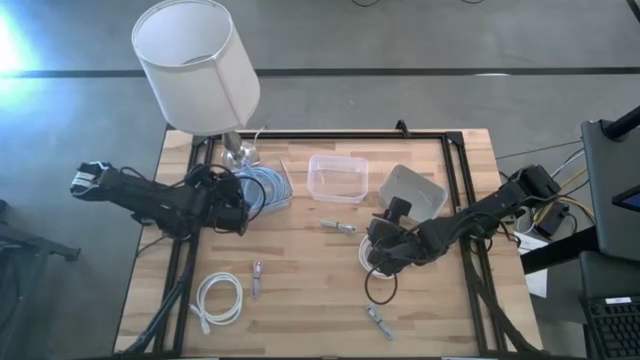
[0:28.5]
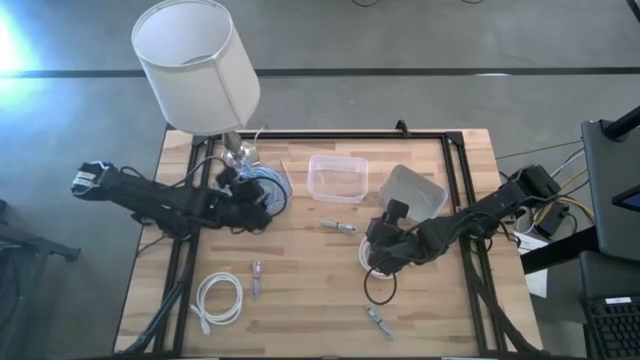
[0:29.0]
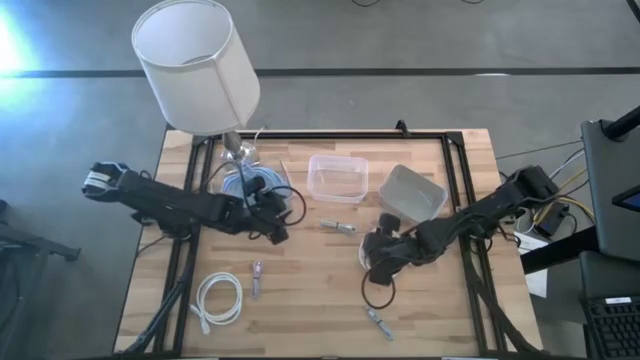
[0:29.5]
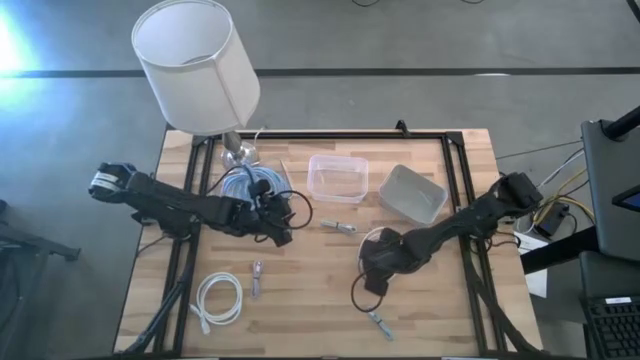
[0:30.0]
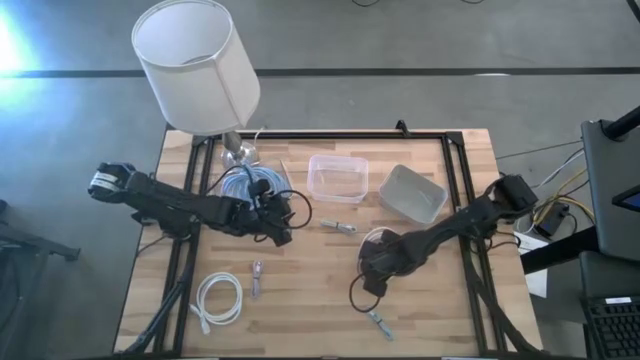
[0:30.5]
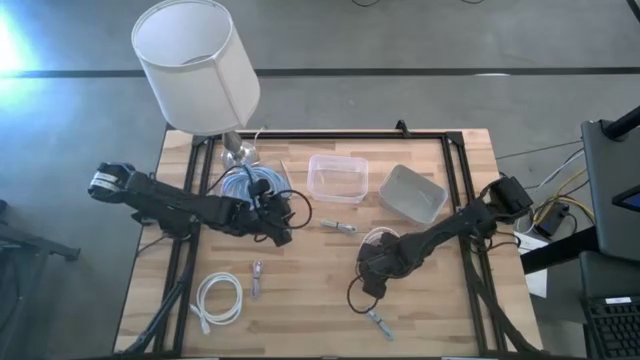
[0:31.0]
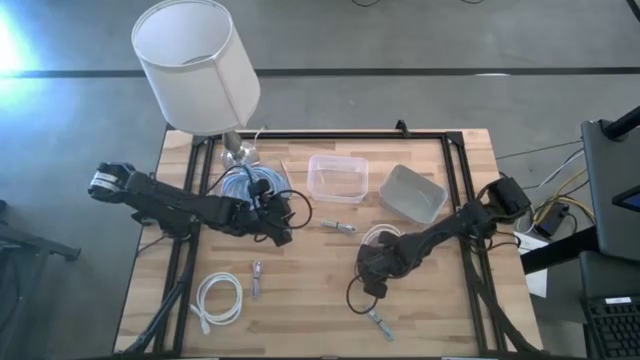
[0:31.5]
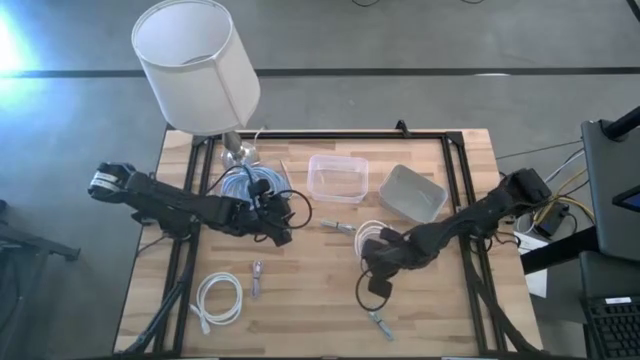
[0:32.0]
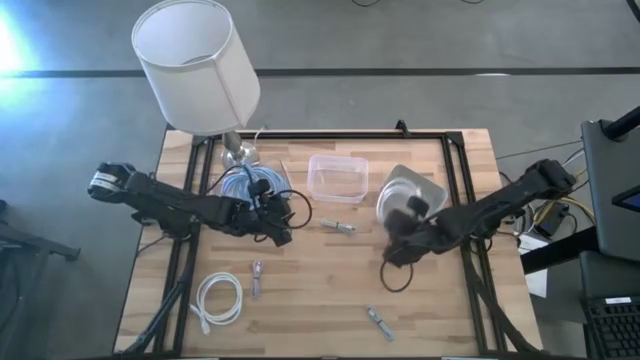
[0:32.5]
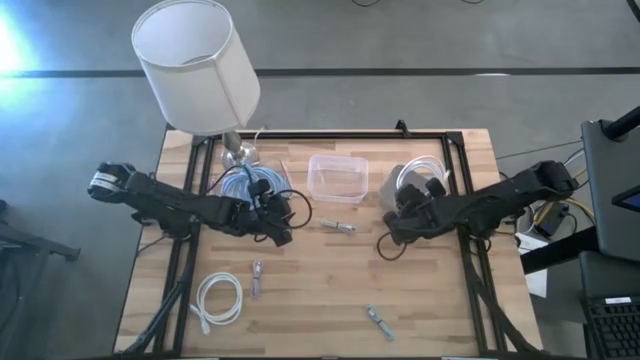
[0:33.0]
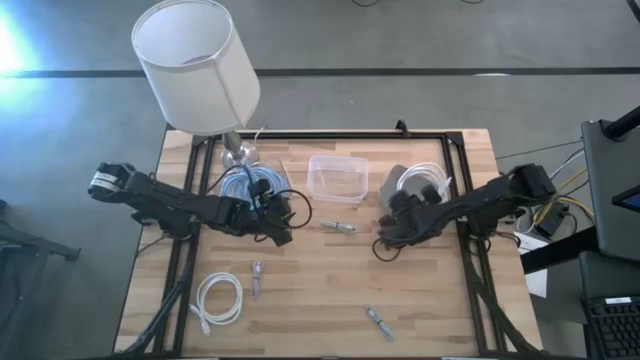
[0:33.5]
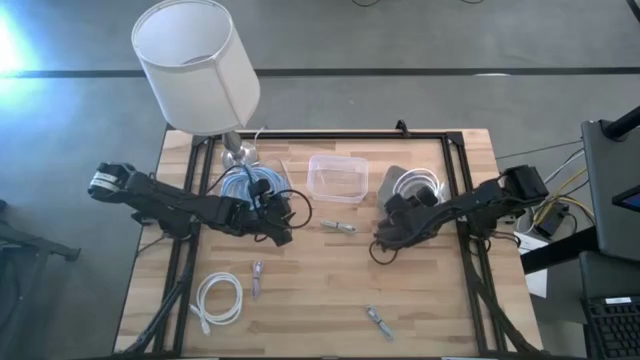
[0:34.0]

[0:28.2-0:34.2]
Task: Pick & Place USB Port
Put the right white HDMI cable into the gray bin

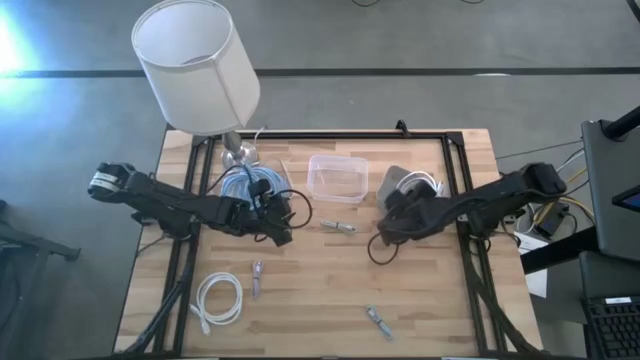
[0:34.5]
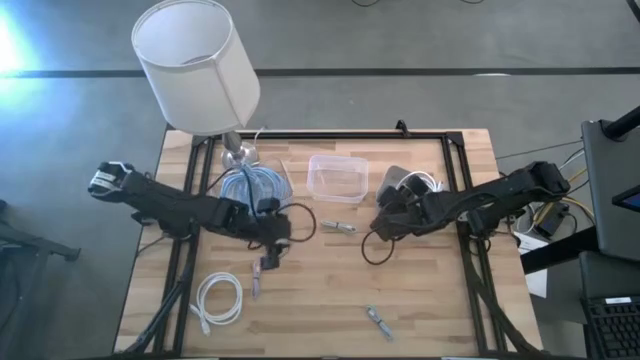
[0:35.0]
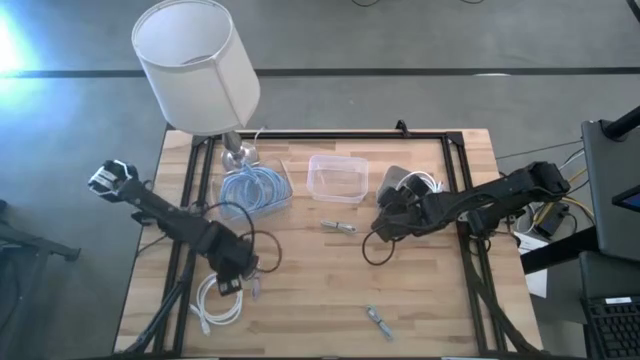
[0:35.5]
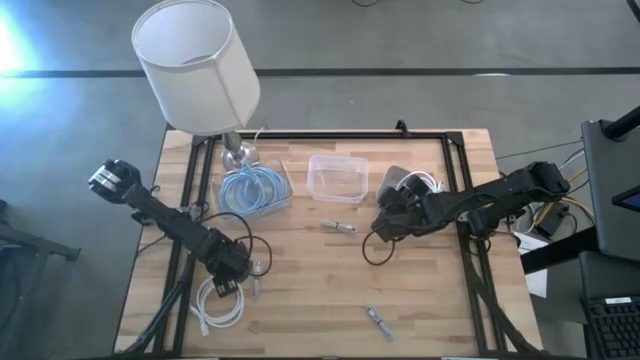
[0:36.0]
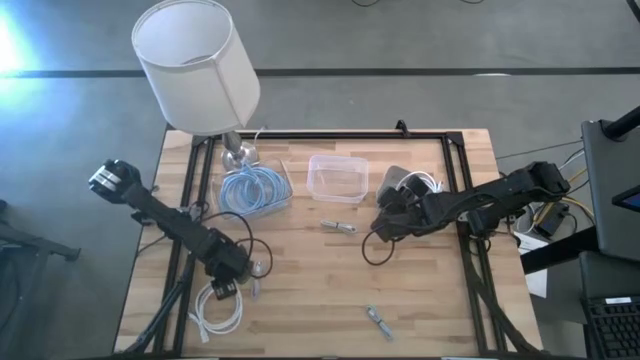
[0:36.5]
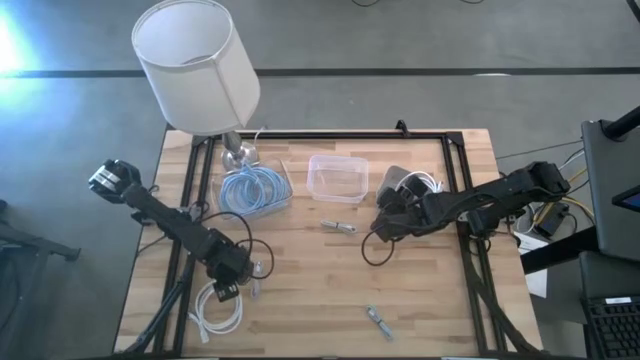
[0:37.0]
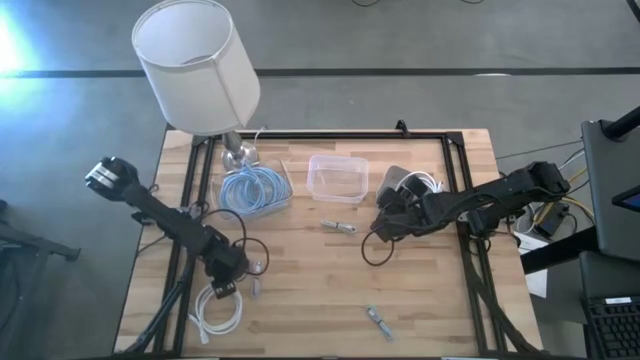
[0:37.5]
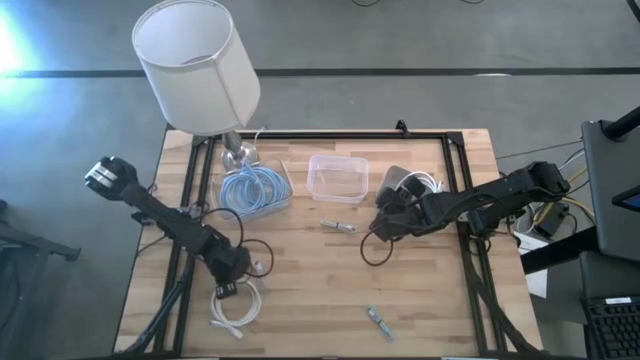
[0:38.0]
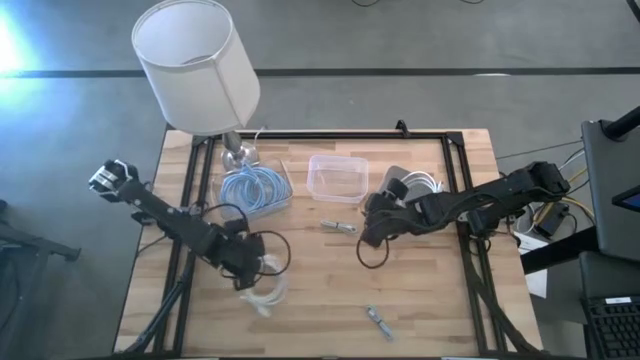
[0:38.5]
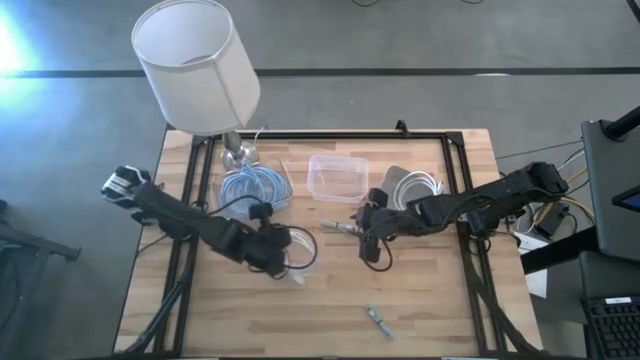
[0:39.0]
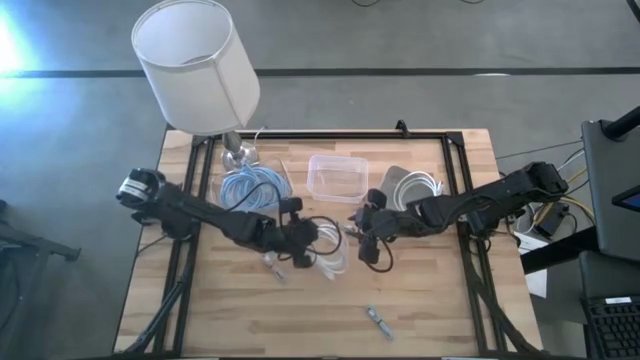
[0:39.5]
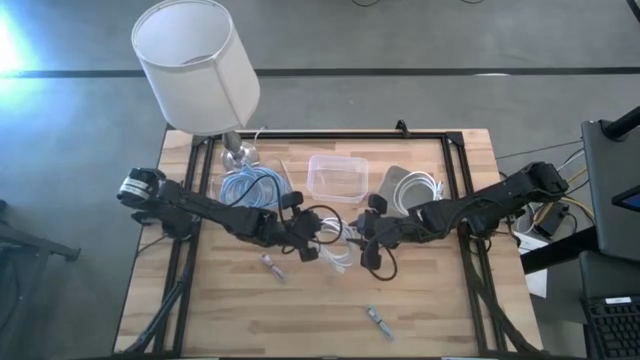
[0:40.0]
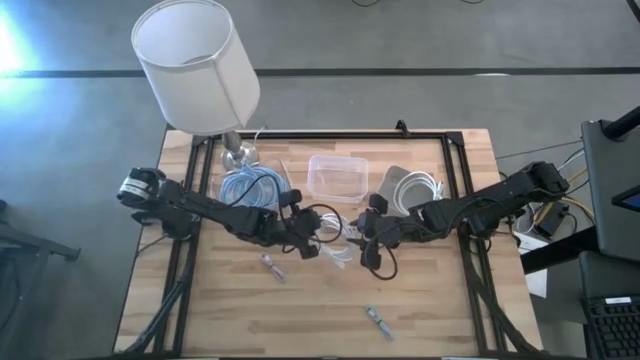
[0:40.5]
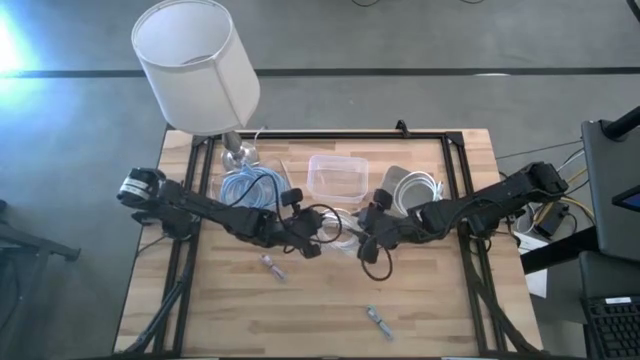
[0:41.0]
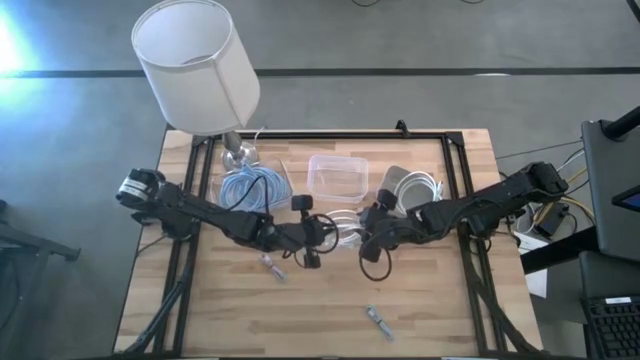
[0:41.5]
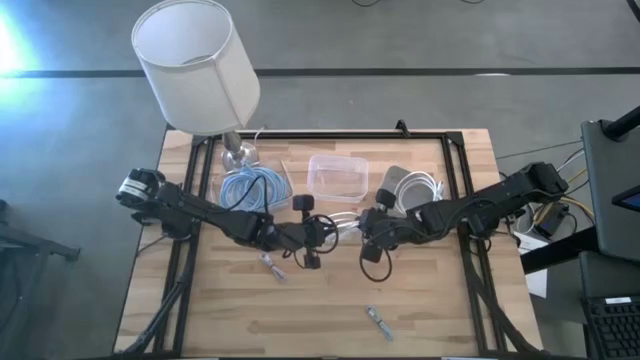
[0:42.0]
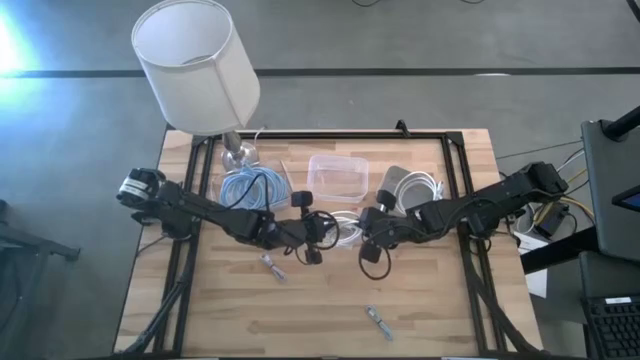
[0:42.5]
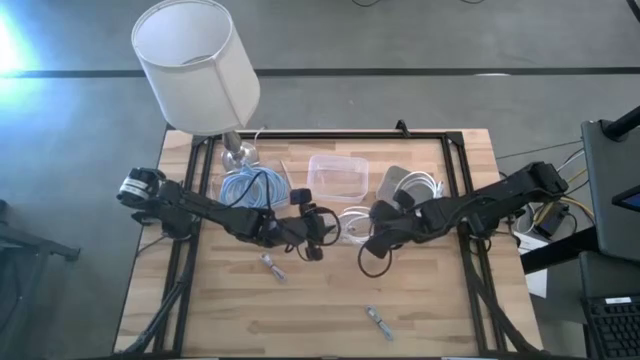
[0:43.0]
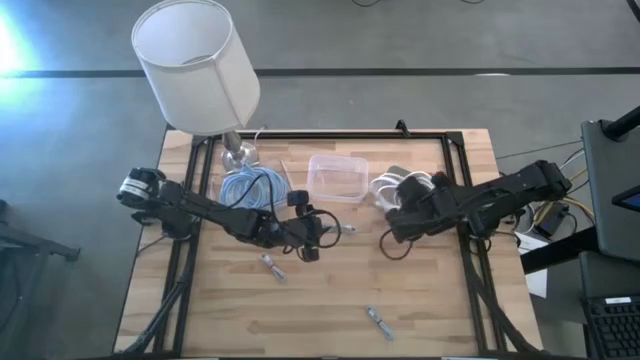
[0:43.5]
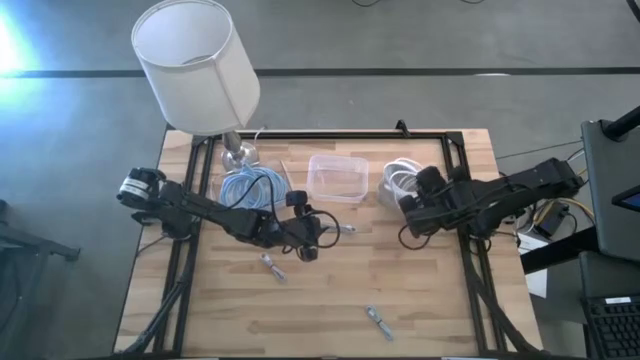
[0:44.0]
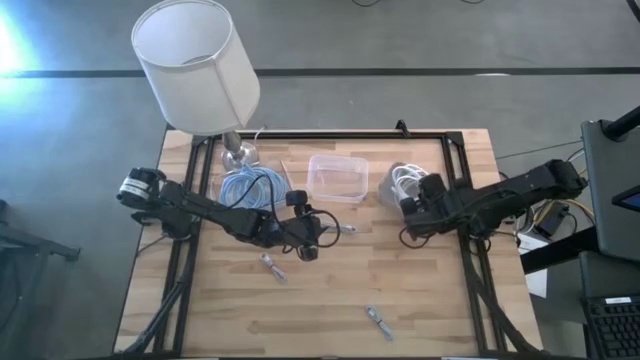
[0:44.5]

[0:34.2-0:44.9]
Put the white HDMI cable into the gray bin

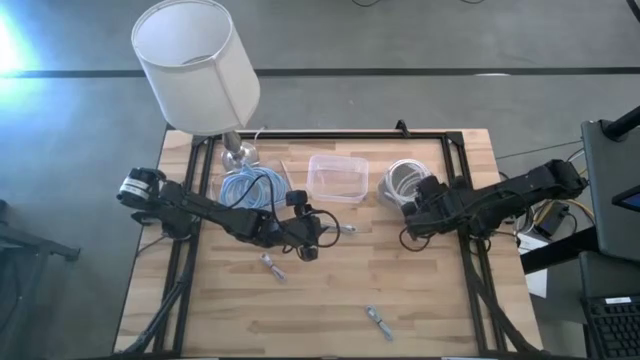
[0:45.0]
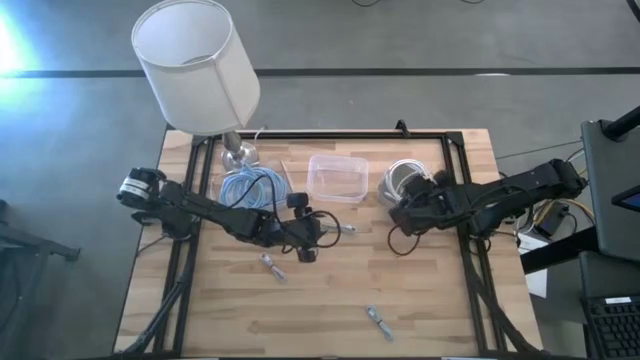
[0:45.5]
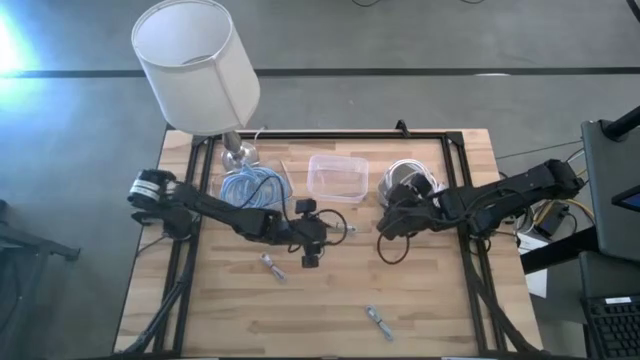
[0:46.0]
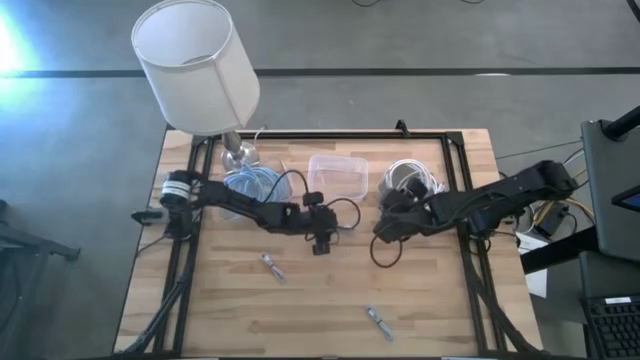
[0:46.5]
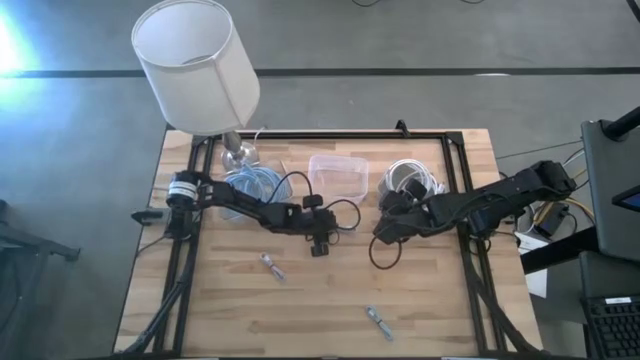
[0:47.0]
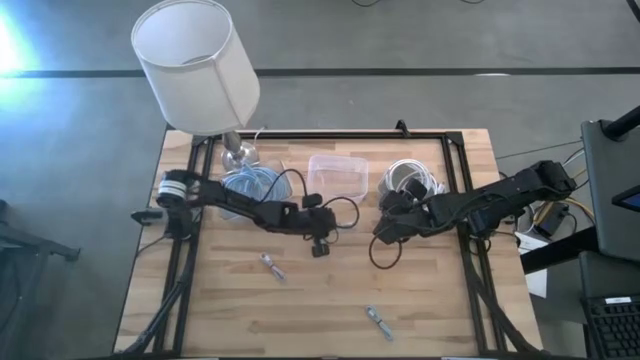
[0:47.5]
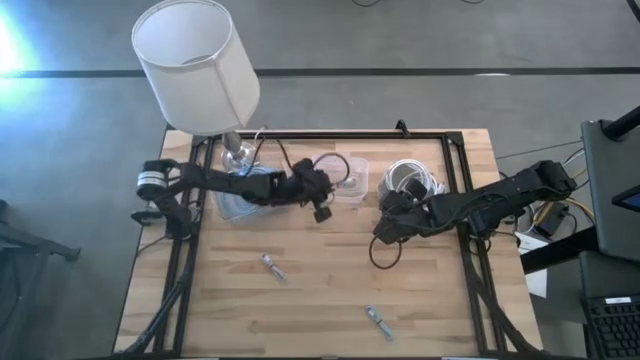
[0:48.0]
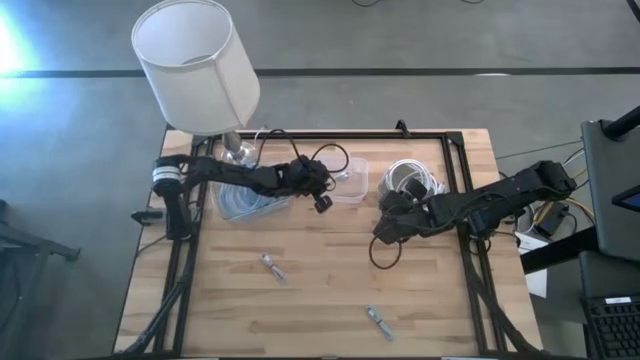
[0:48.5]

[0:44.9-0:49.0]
Put the white charger cable into the right transparent bin
